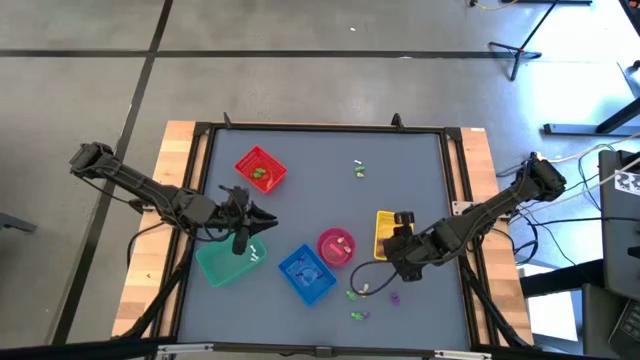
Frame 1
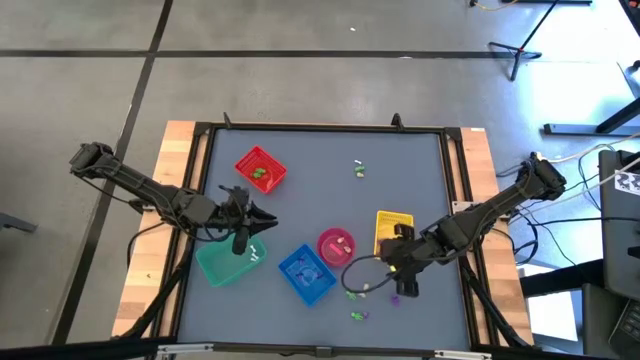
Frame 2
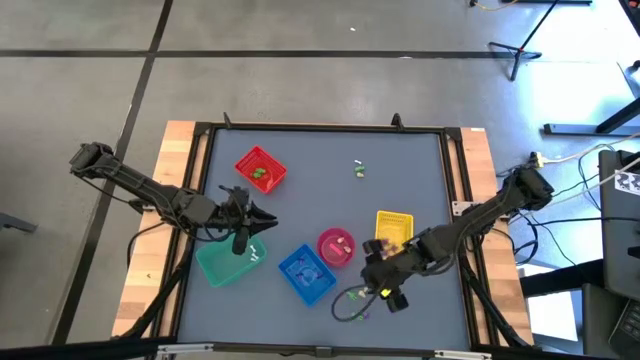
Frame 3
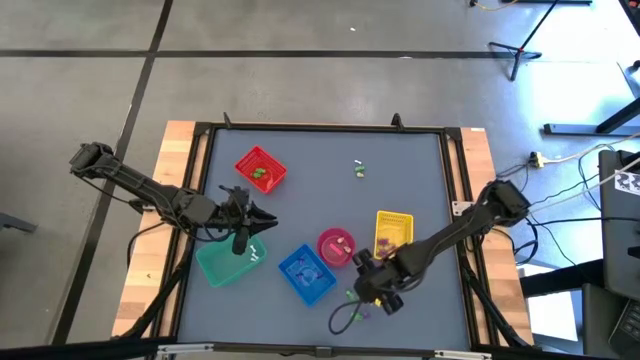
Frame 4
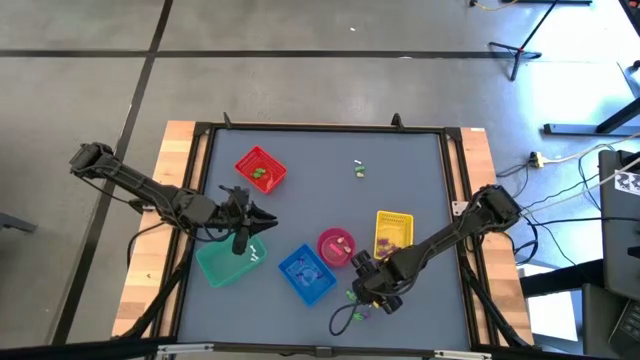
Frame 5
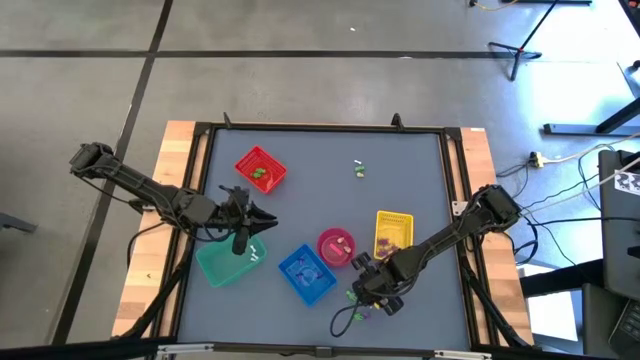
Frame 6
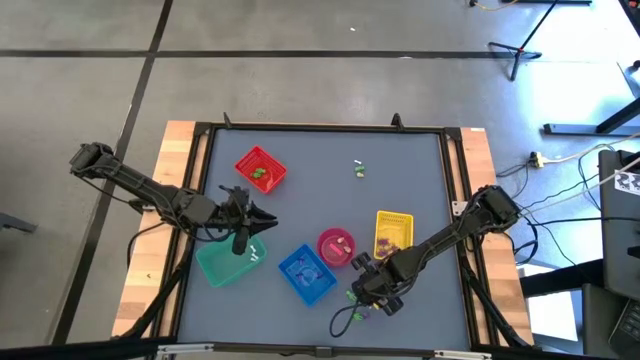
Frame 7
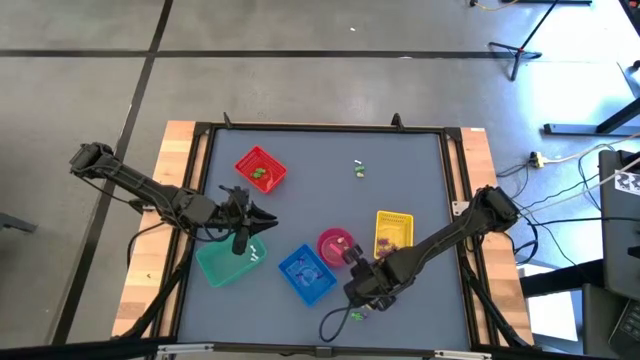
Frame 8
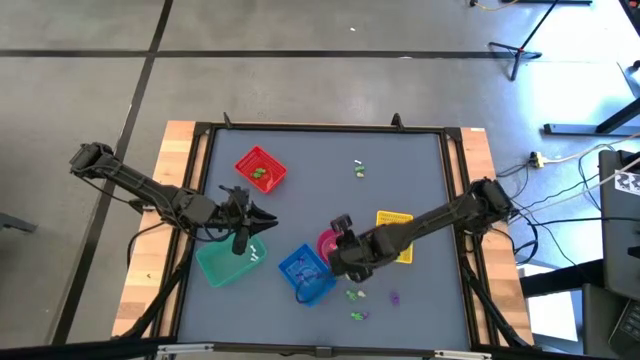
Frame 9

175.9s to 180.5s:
Task: Sort Halloween decoration
Put the white skull toy into the pink bin

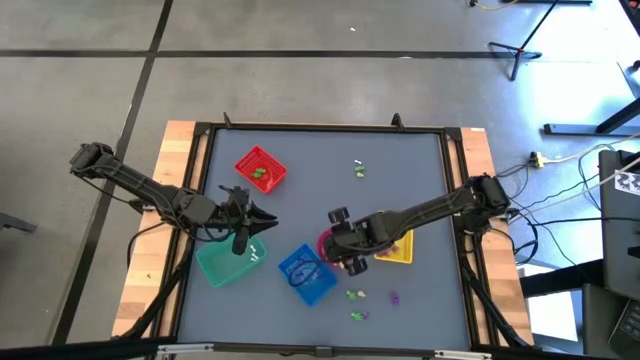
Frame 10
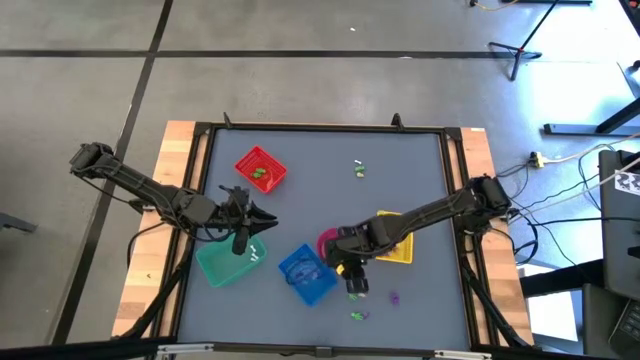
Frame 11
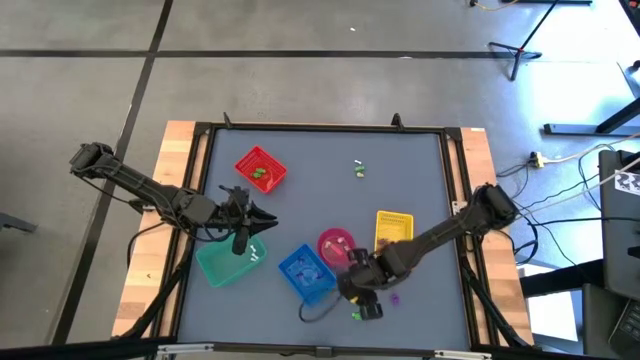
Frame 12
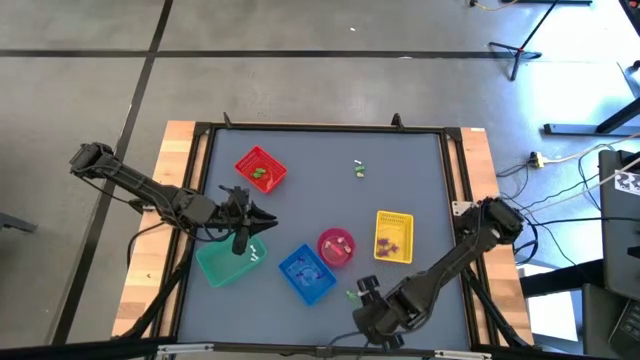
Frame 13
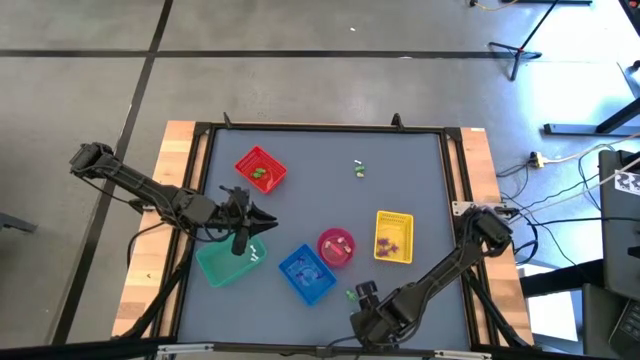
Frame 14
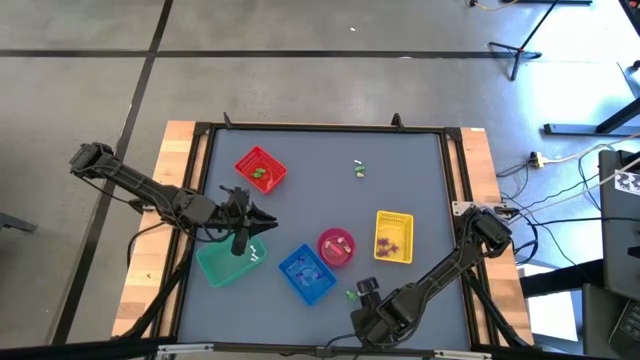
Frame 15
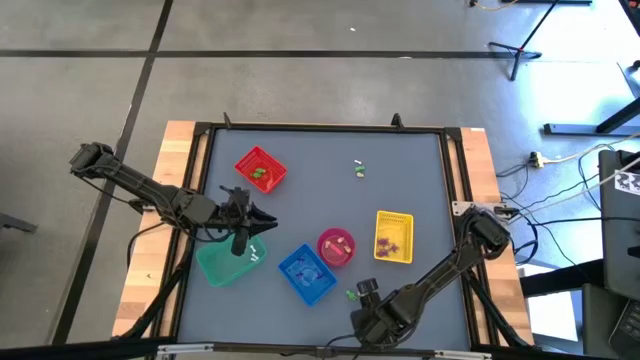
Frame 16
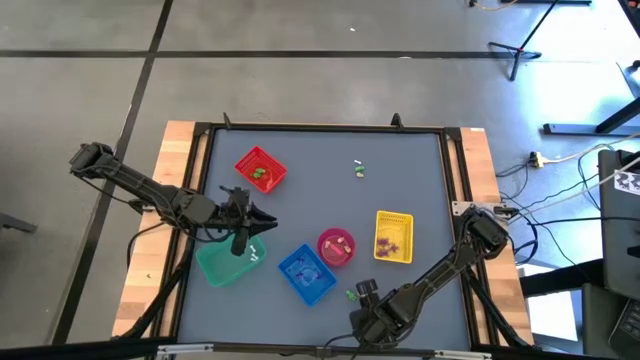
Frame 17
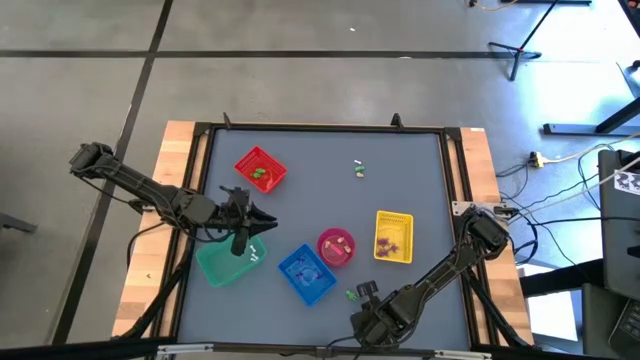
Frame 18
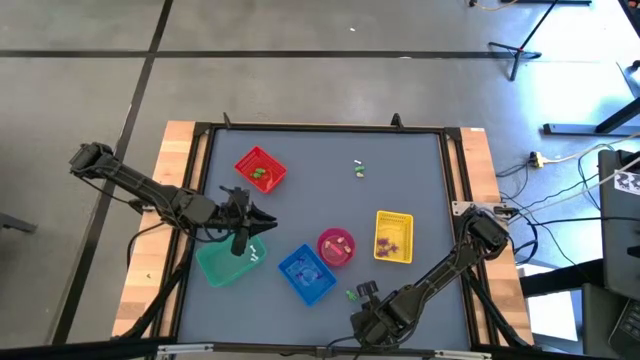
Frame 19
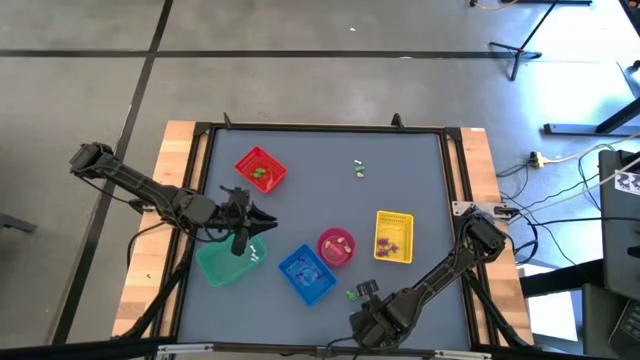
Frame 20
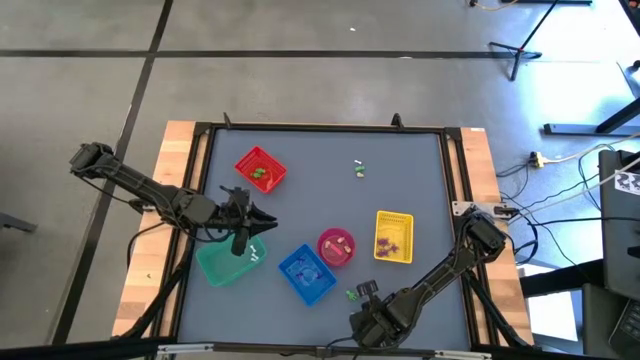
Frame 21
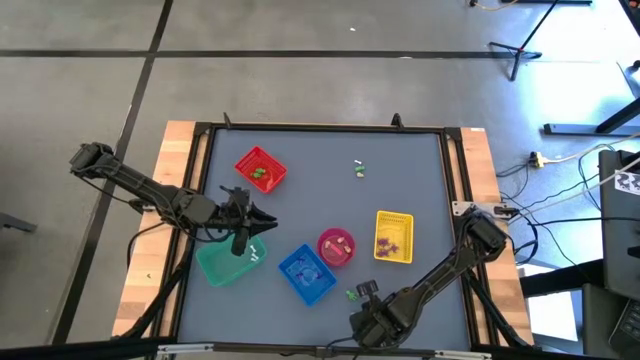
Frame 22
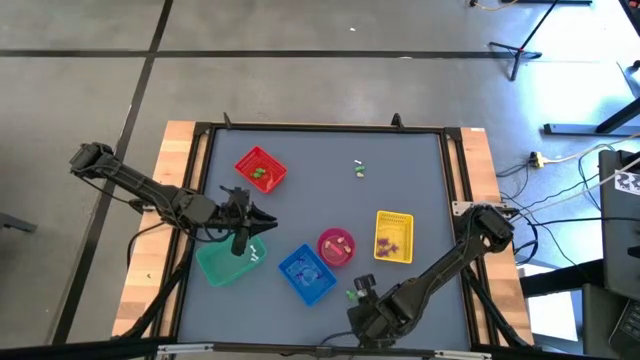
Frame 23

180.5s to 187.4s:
Put the violet witch hat toy into the blue bin

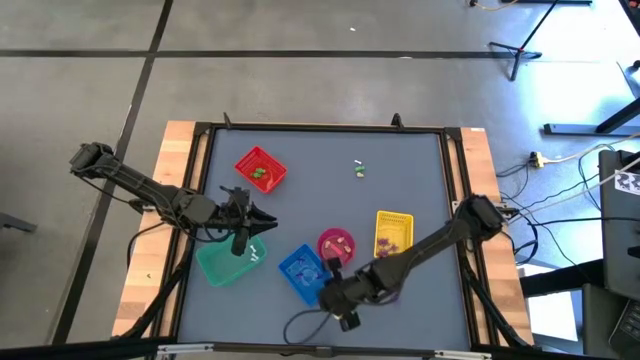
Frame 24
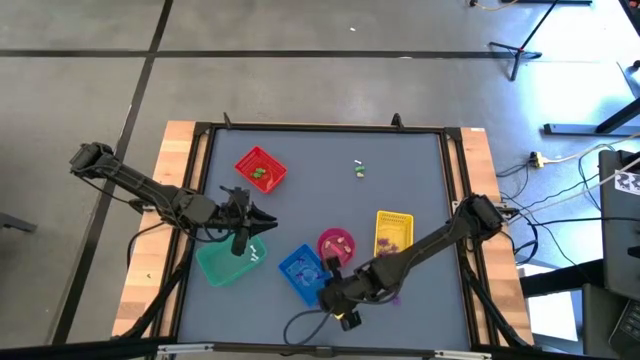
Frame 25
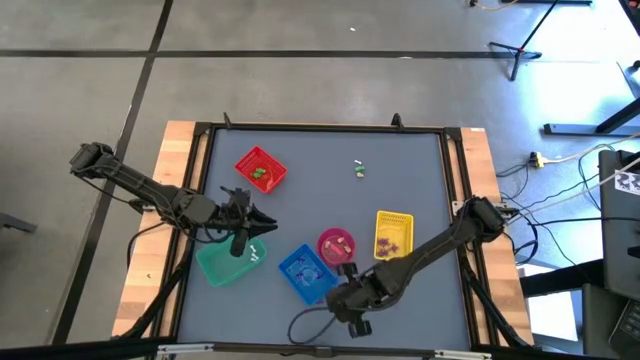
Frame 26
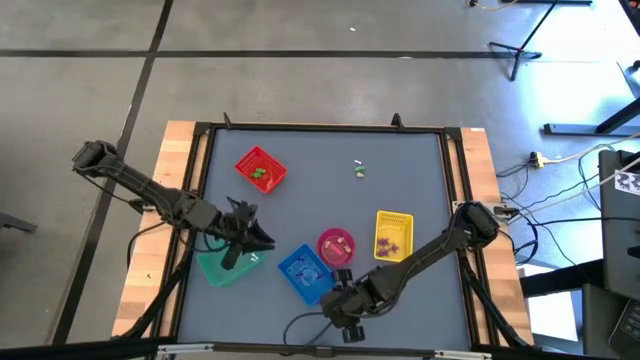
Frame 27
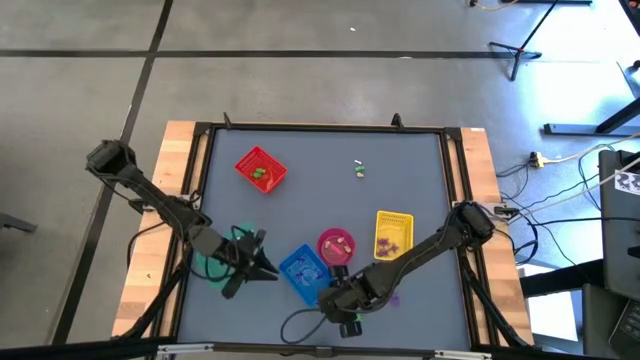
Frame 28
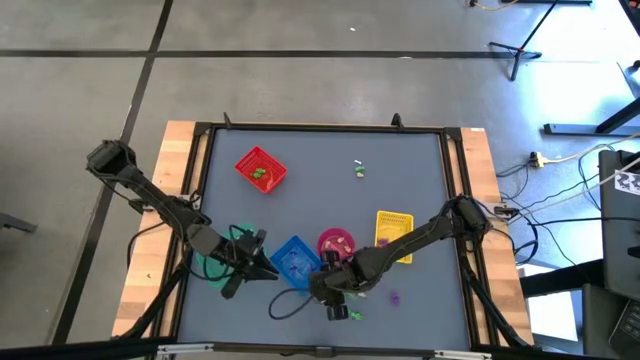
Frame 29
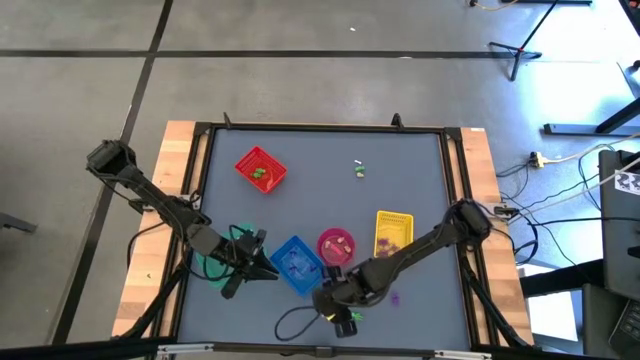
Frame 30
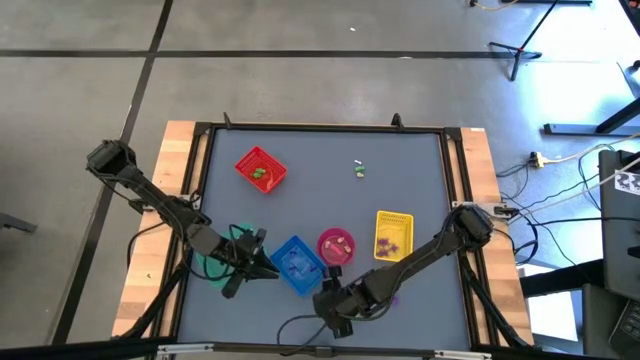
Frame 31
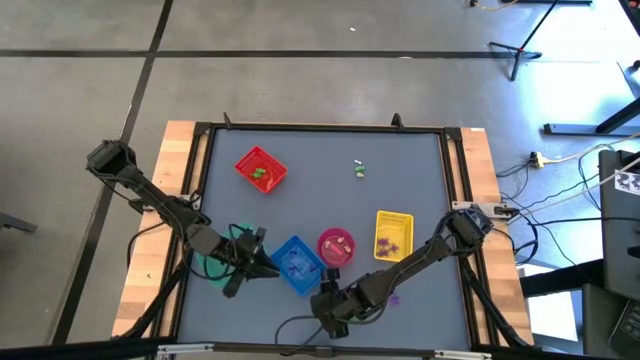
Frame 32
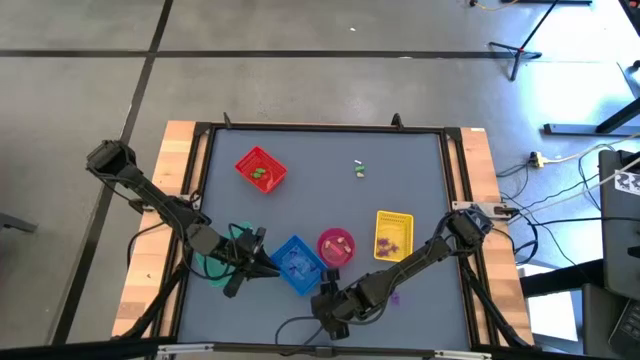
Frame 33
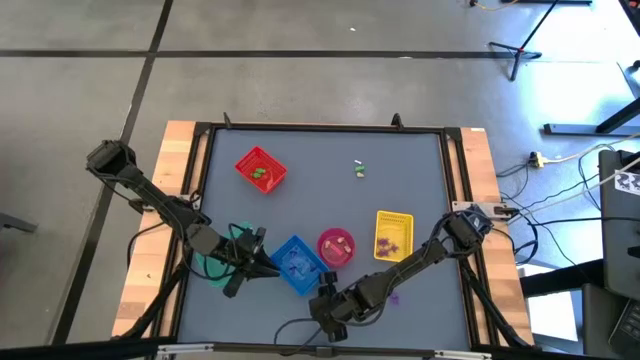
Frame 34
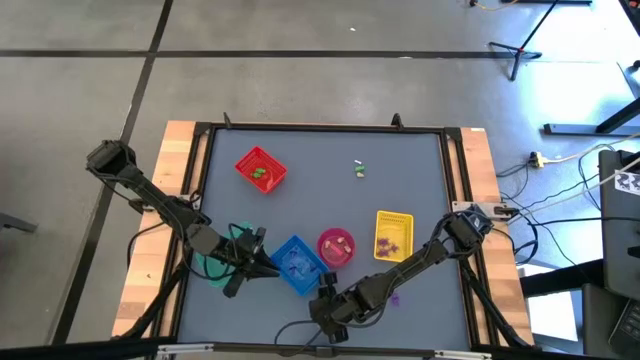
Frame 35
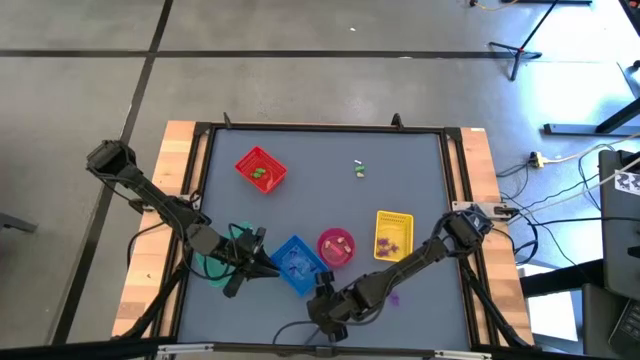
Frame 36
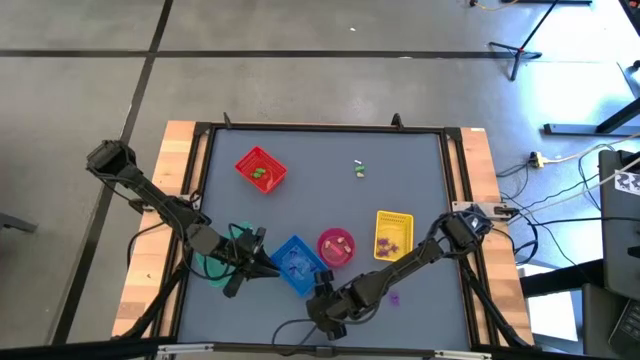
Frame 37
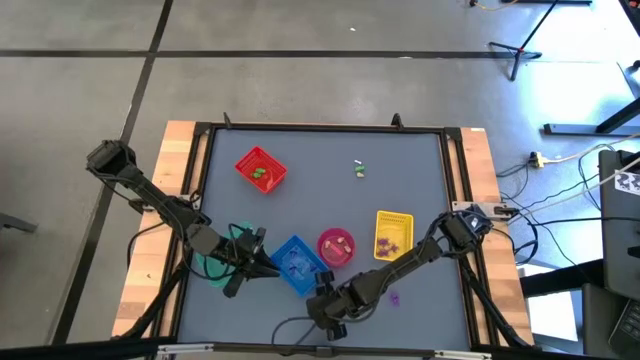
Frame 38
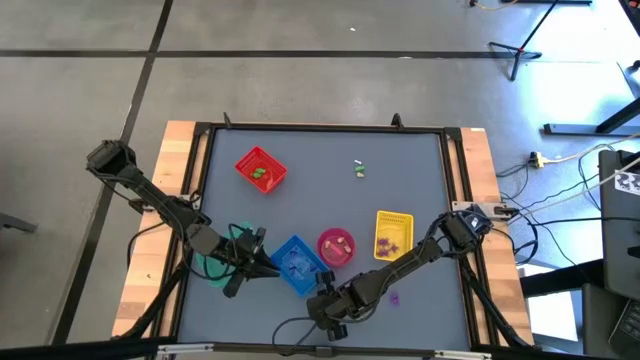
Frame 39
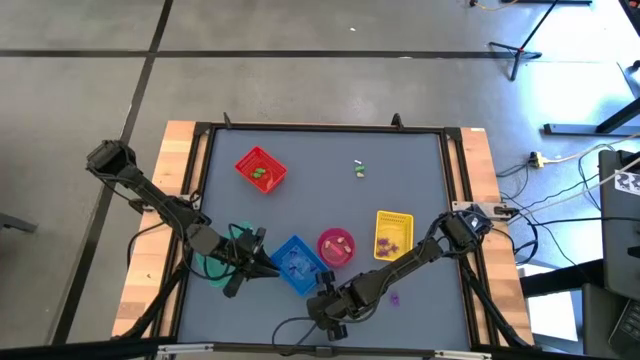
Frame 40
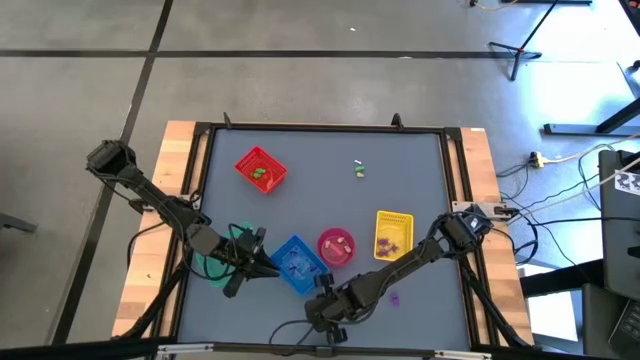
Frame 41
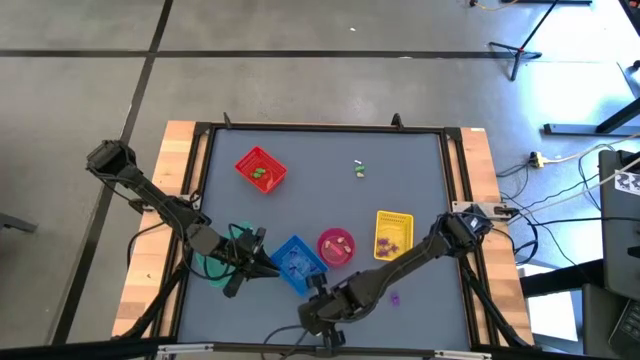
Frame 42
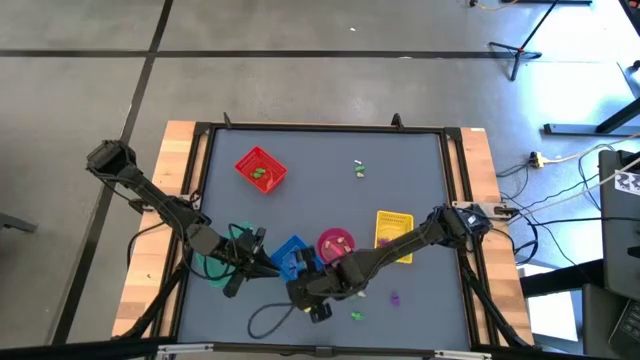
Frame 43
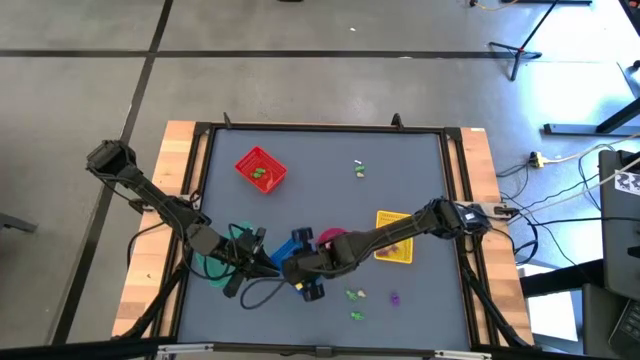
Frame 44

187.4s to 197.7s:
Put the violet witch hat toy into the blue bin
